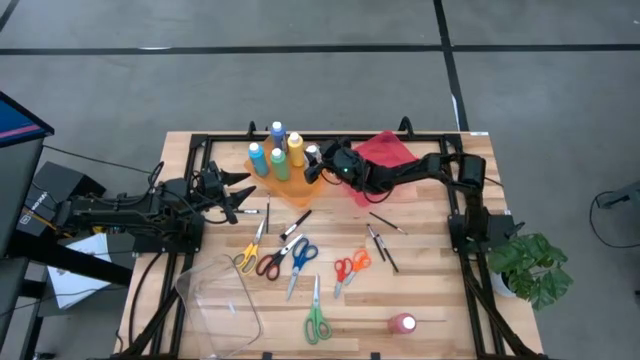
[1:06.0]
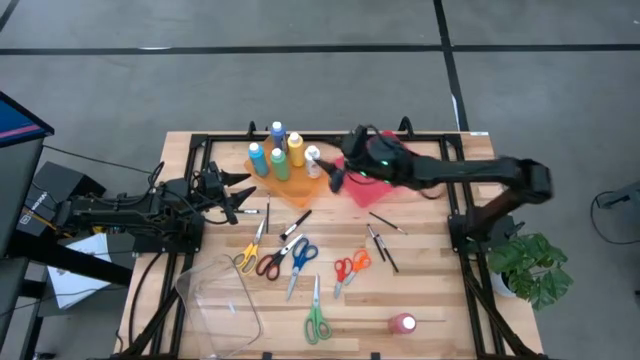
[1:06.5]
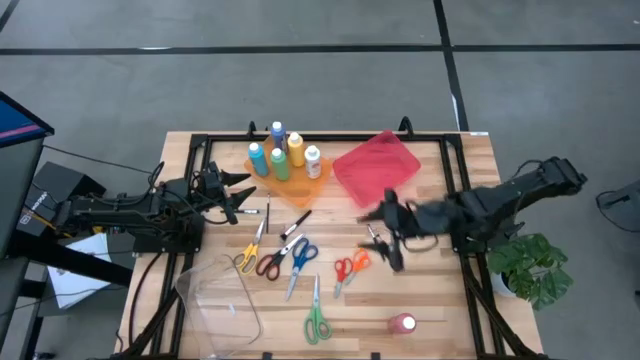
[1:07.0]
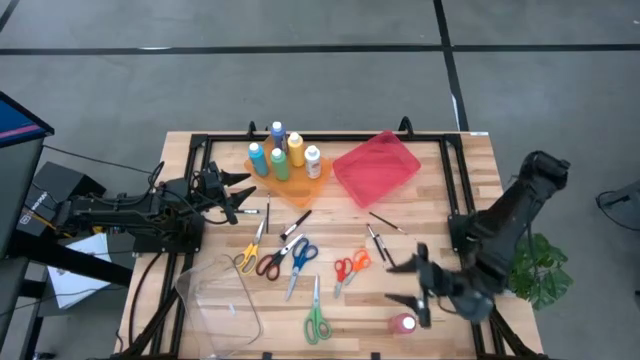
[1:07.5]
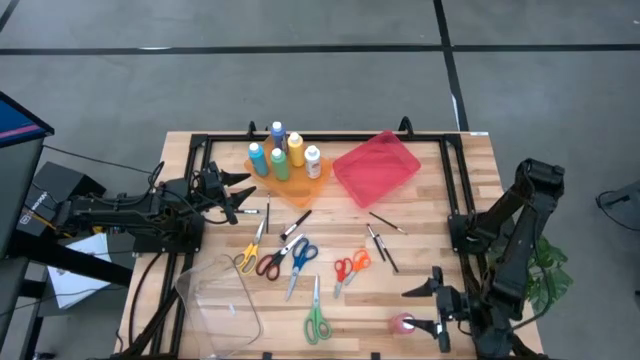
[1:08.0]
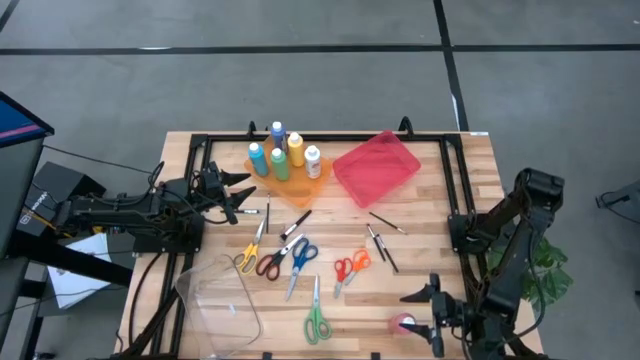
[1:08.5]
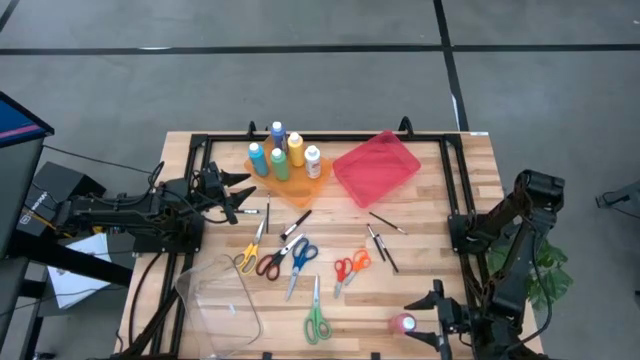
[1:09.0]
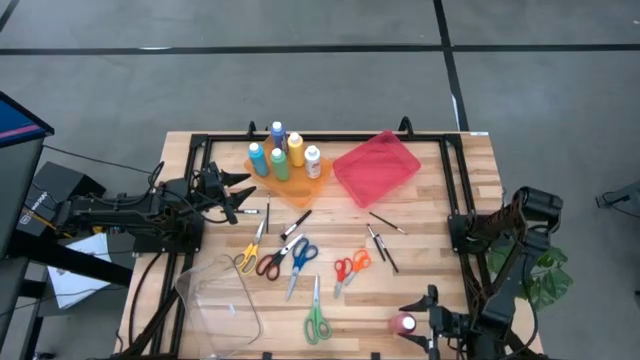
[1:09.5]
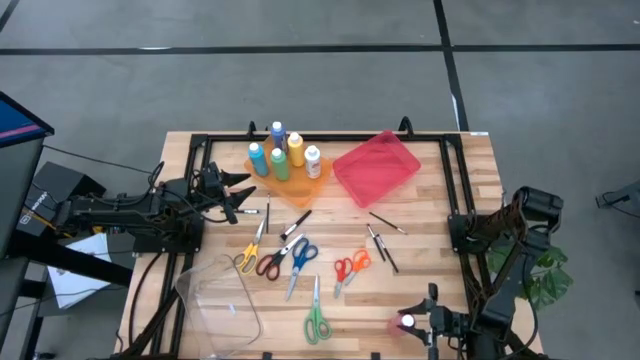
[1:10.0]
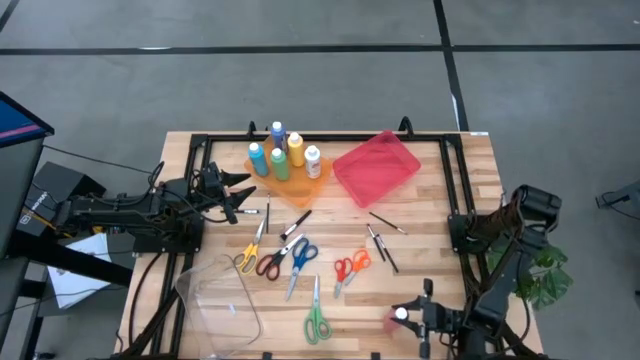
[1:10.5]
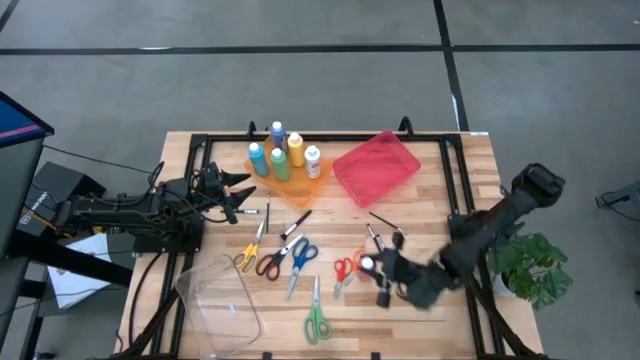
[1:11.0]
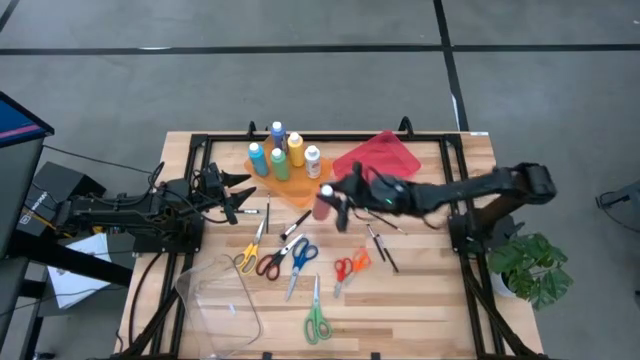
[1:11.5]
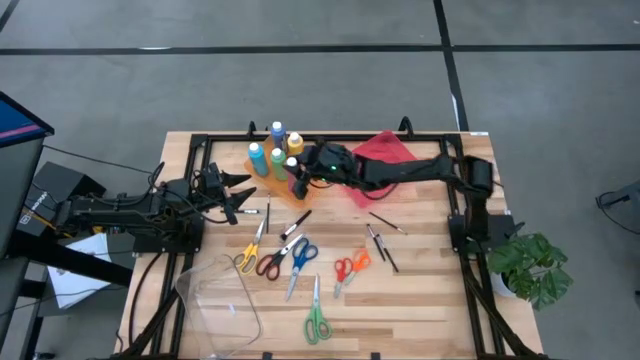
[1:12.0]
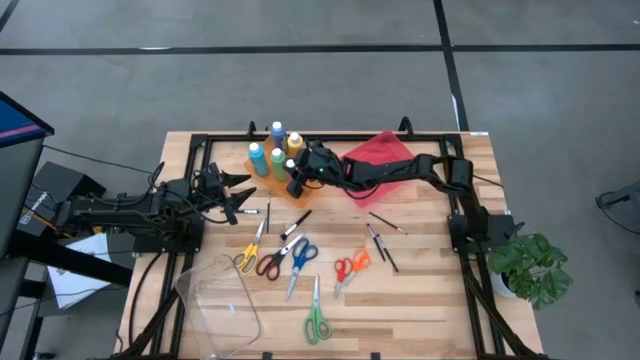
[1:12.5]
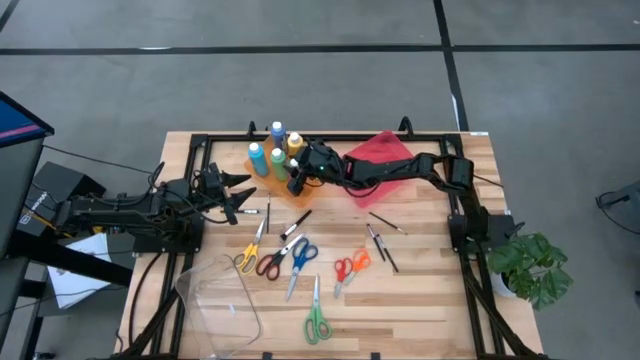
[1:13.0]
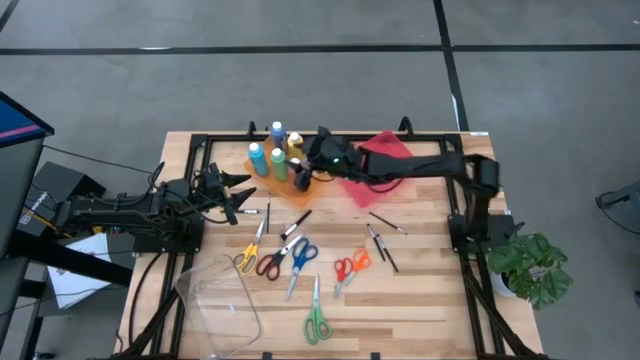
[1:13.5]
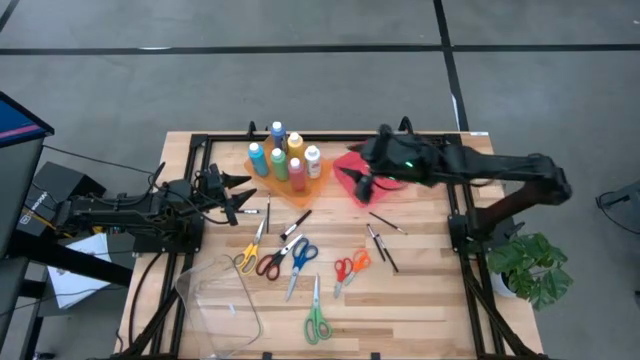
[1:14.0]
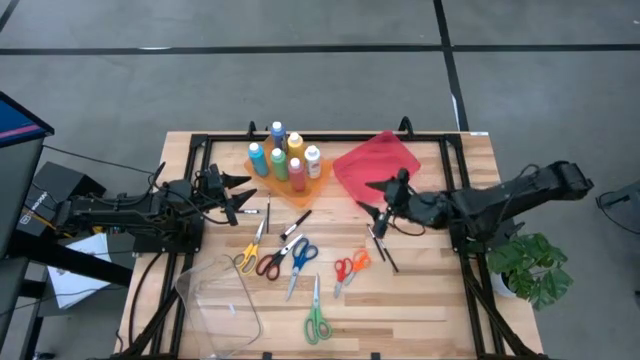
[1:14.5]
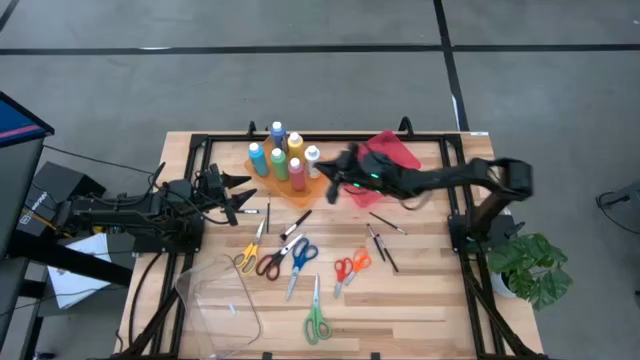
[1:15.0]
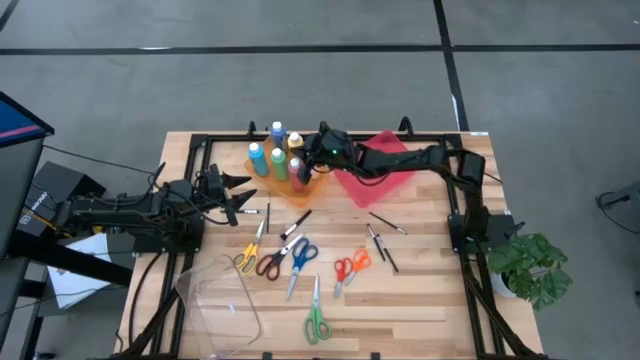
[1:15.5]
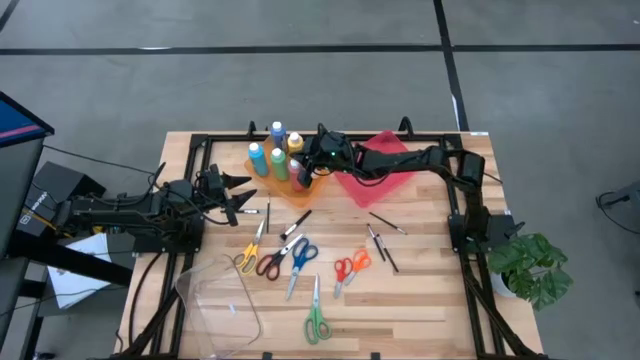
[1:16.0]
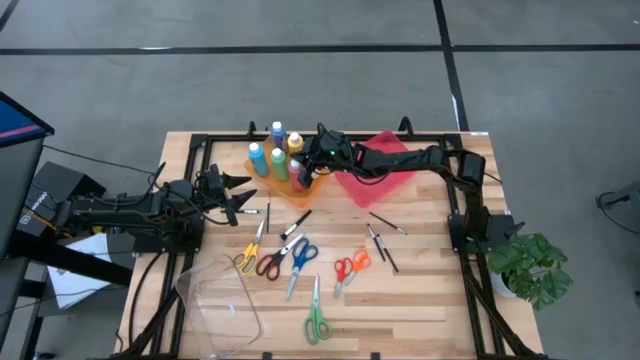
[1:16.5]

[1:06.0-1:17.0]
Task: Pick & Place Paint Supplies
Put the pink paint bottle into the orange bin

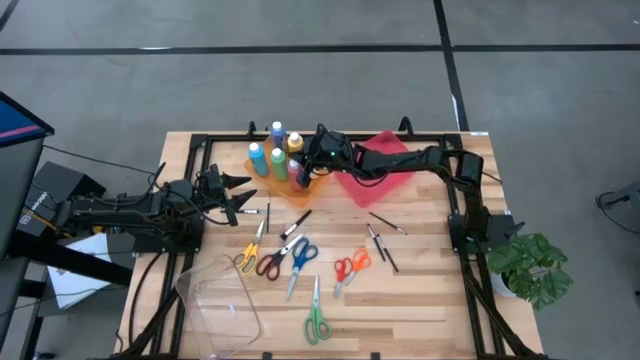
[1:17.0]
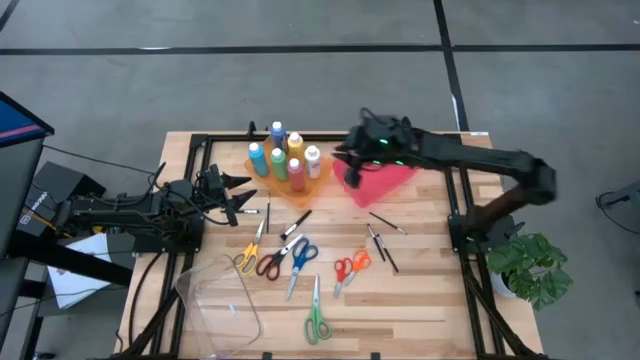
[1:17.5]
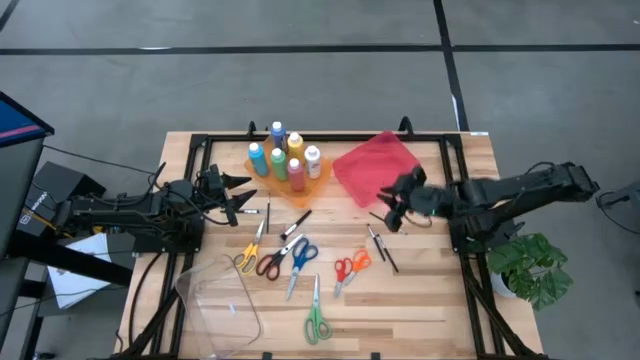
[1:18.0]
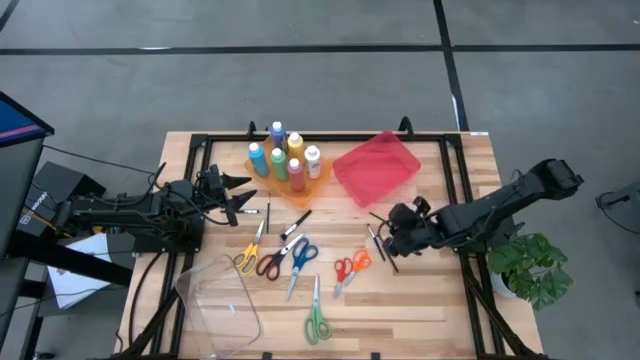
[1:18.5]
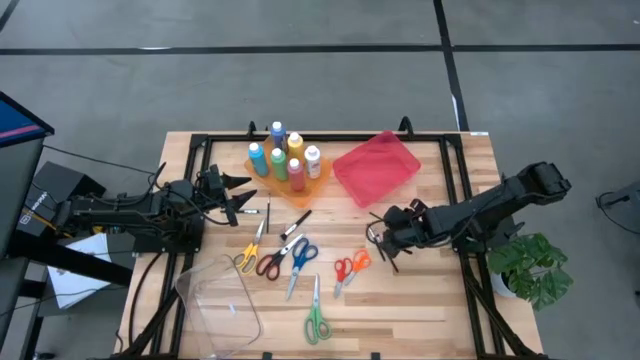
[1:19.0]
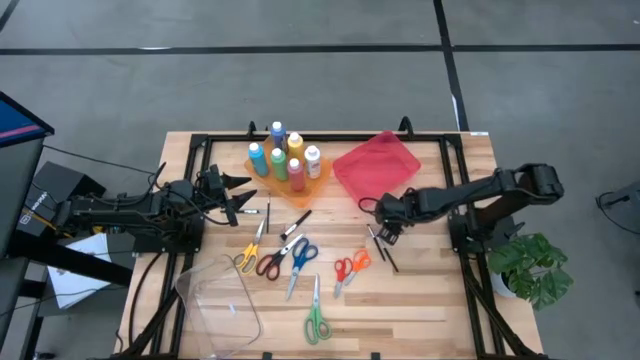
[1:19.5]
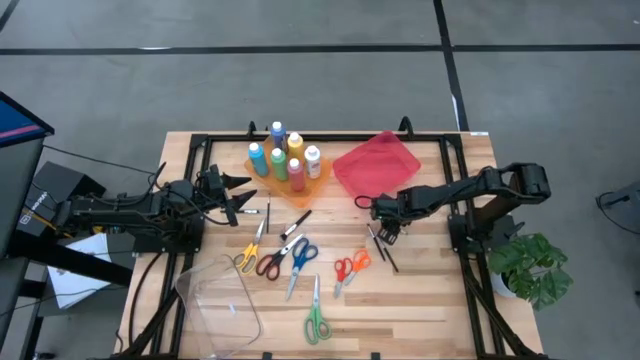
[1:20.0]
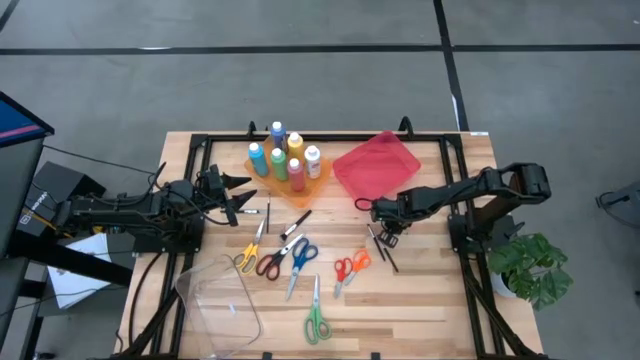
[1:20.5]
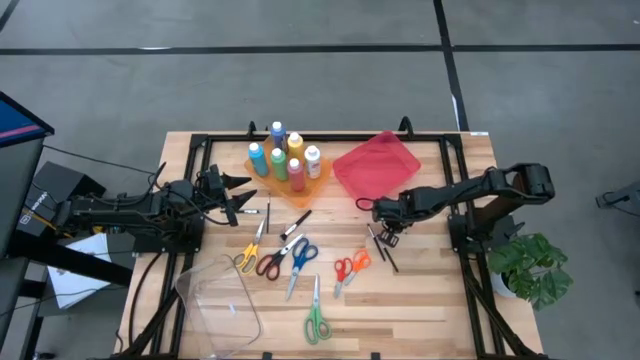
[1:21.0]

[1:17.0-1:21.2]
Put the makeup brush into the transparent bin

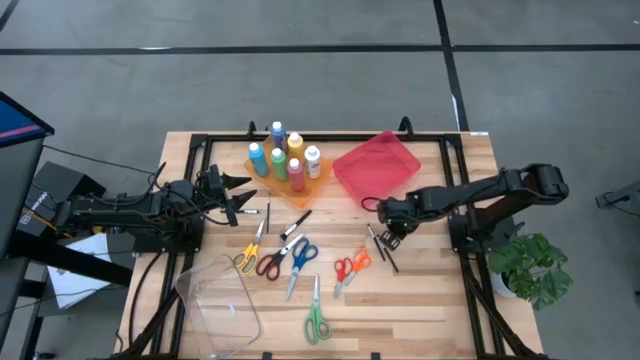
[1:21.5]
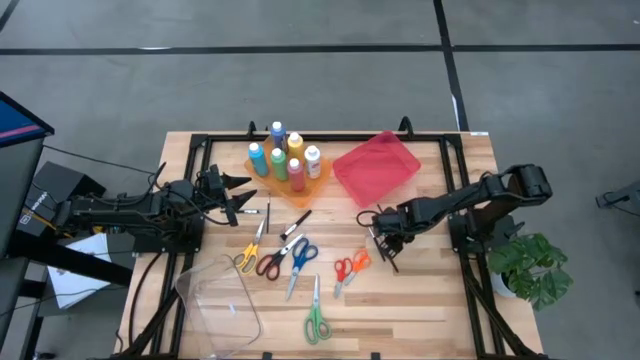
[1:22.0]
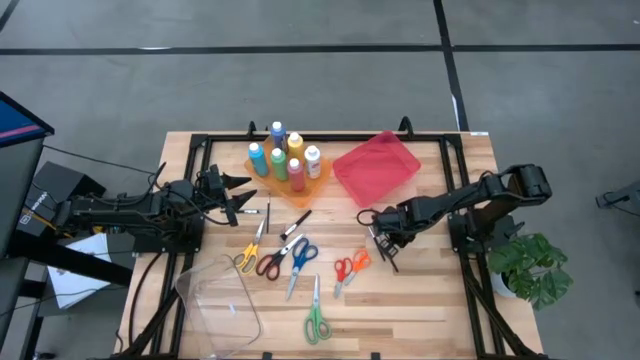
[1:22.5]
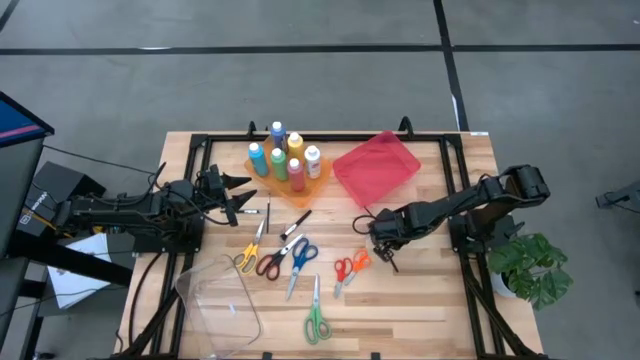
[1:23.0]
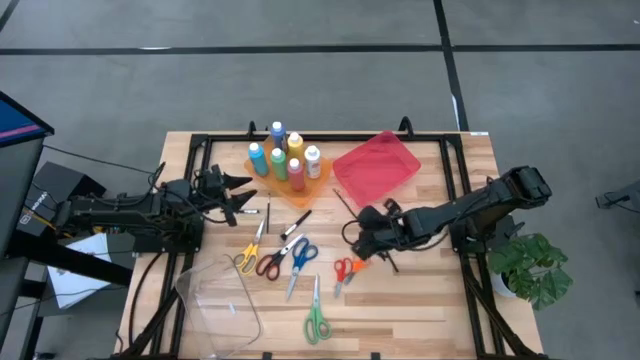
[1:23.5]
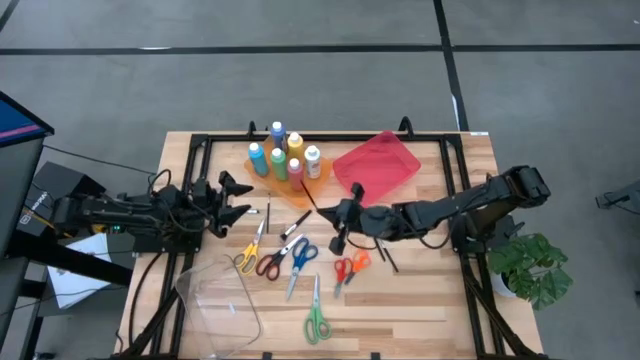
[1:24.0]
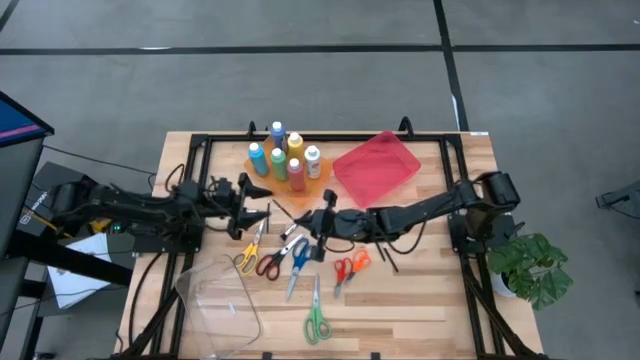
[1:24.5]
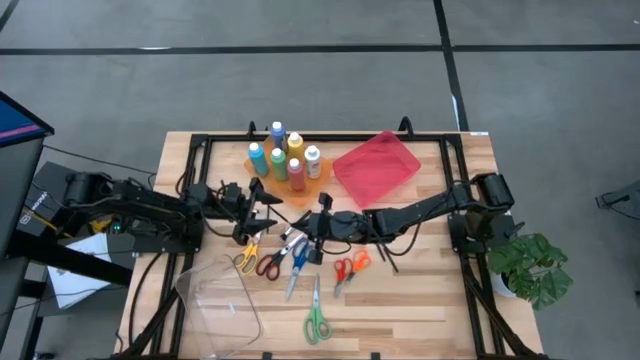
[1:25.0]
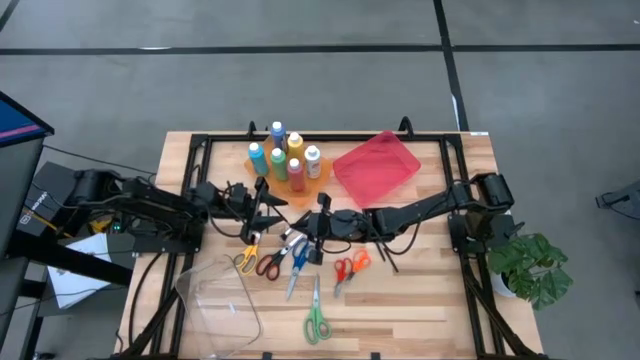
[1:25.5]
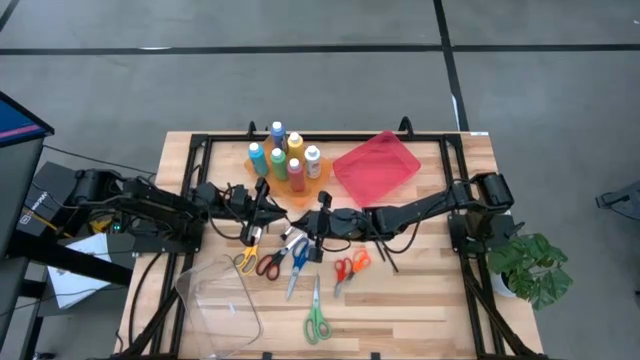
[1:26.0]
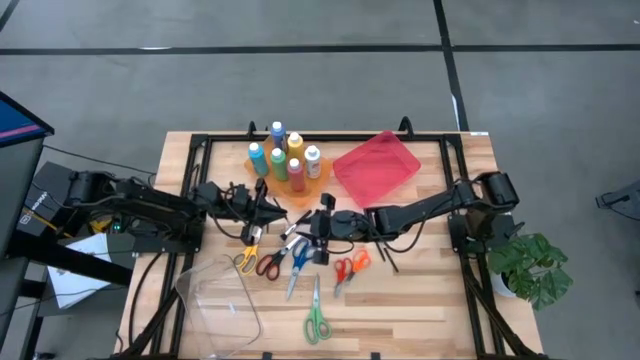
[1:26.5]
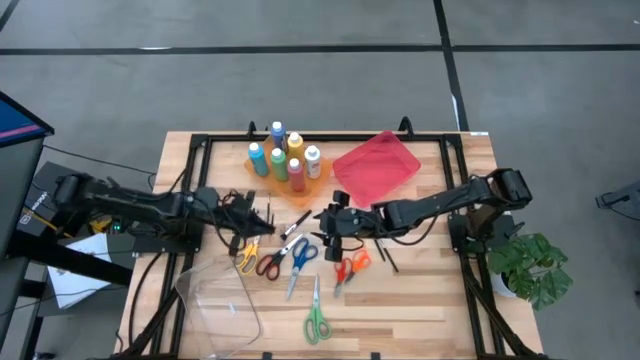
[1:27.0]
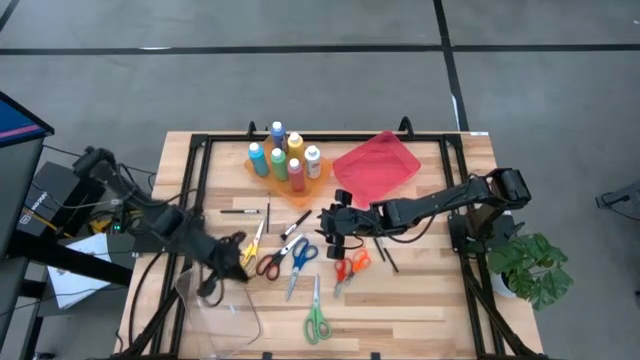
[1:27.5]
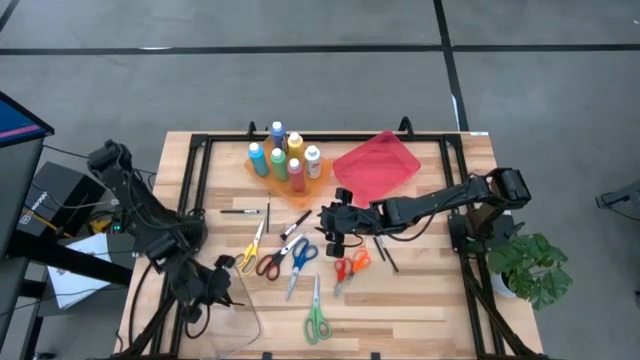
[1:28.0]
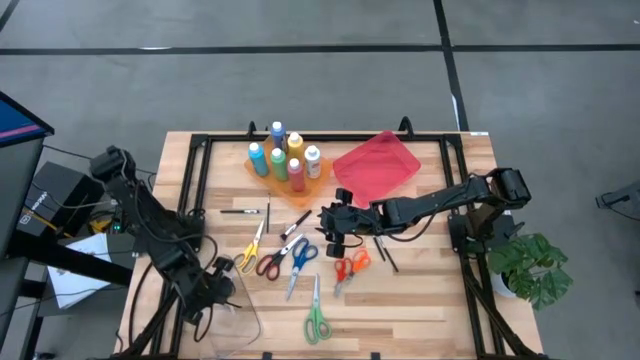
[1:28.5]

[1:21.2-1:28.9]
Put the makeup brush into the transparent bin
